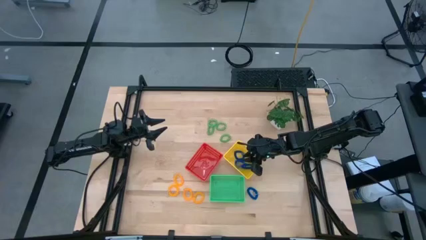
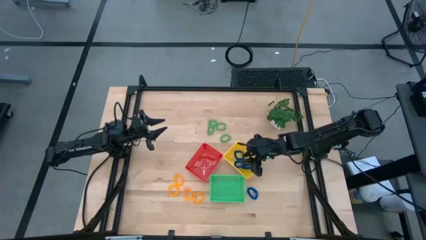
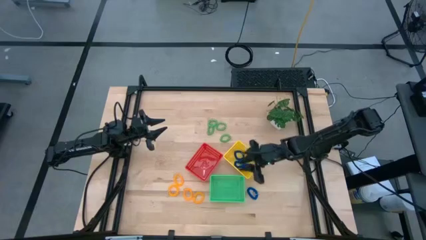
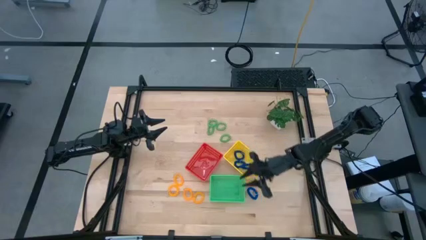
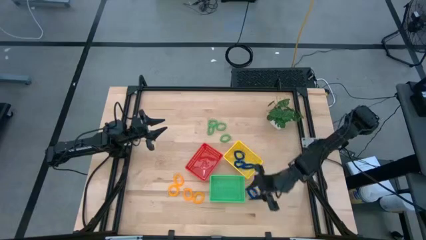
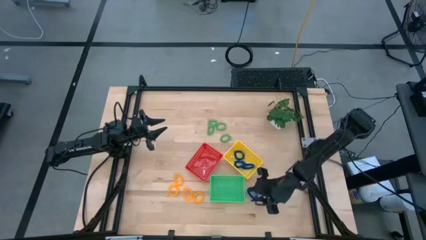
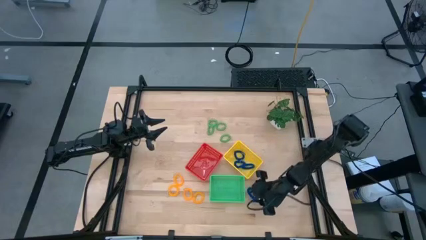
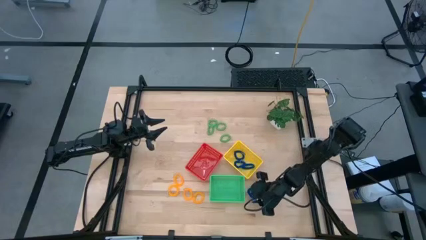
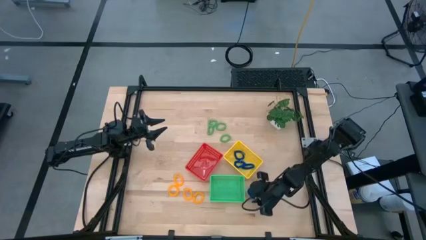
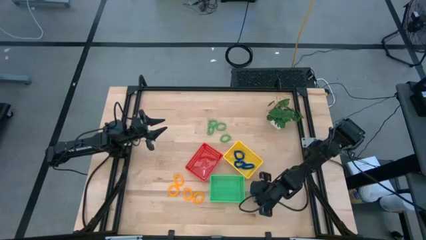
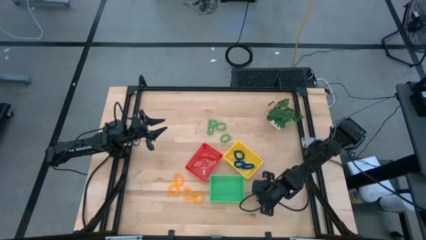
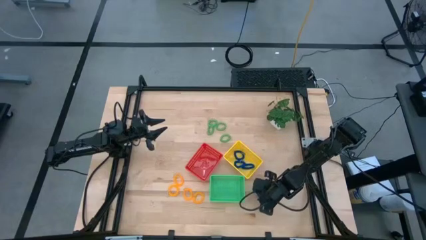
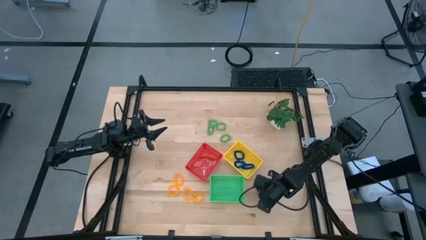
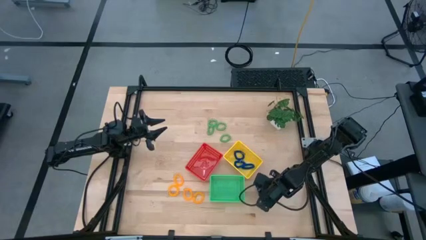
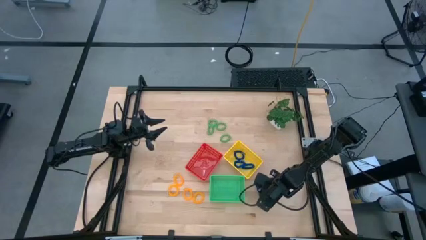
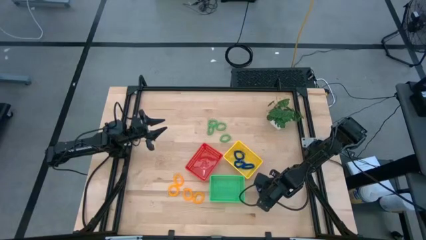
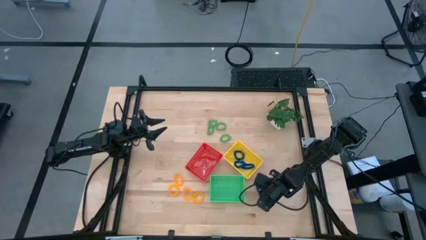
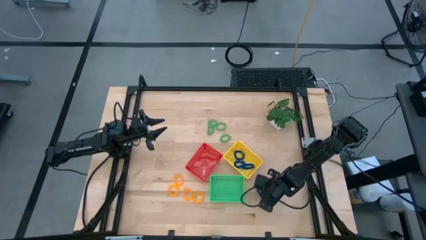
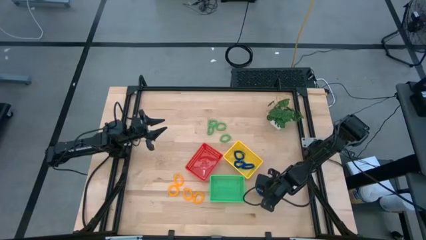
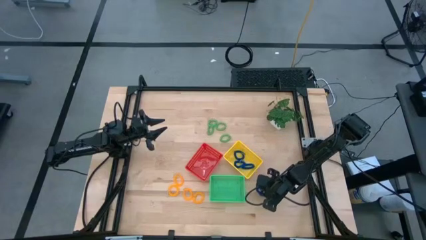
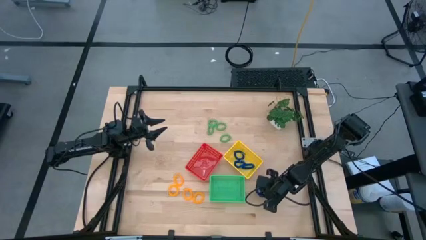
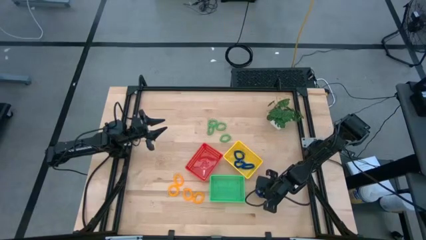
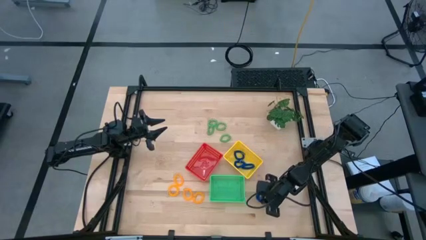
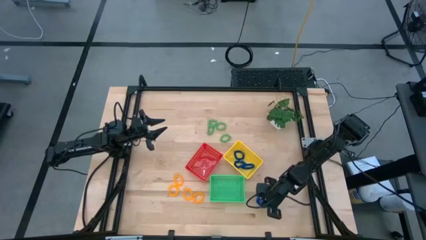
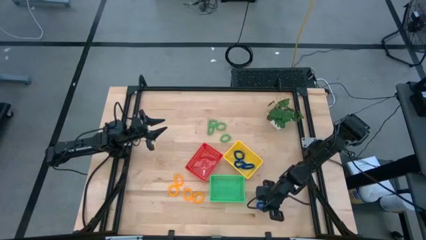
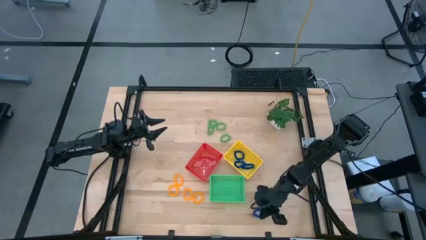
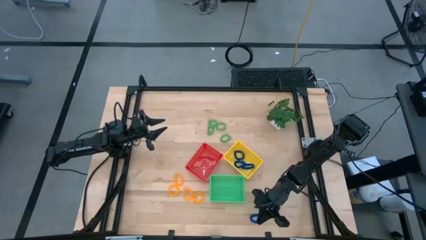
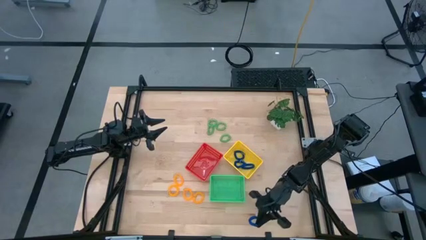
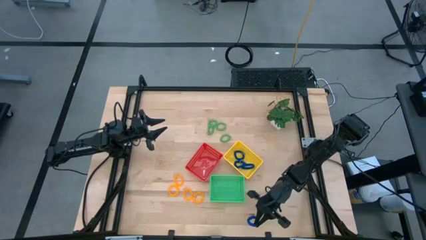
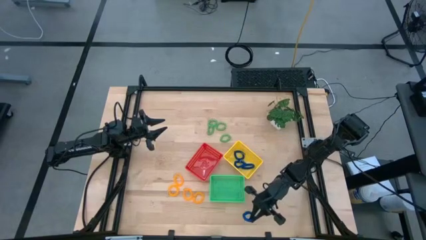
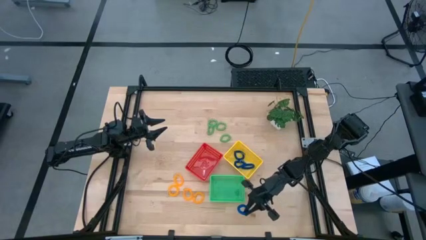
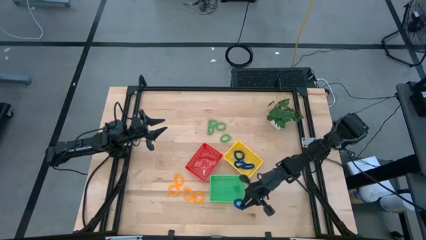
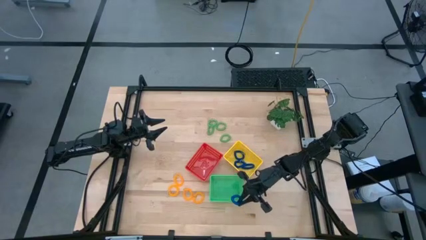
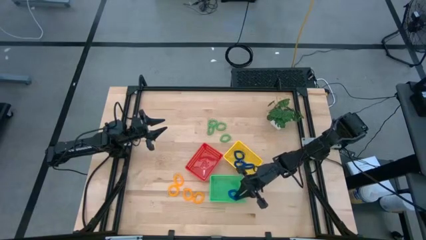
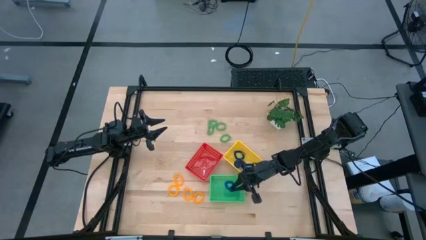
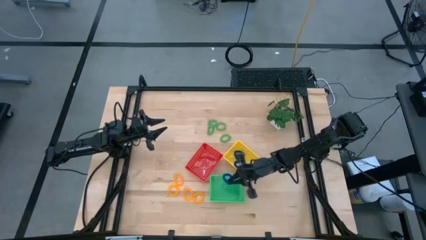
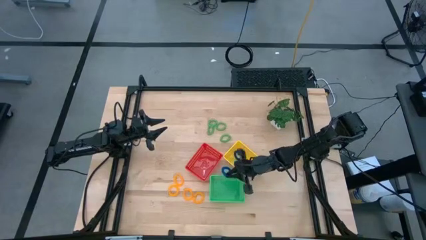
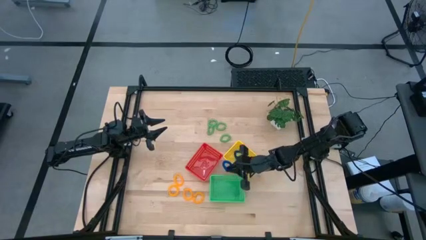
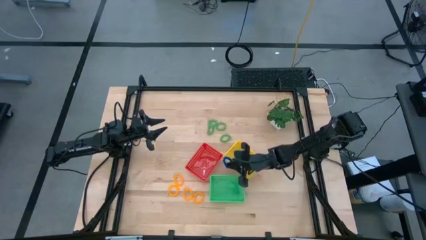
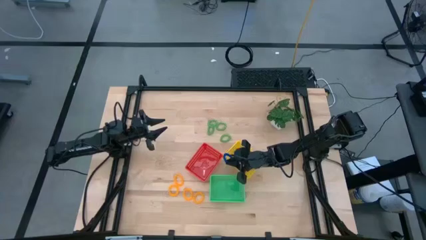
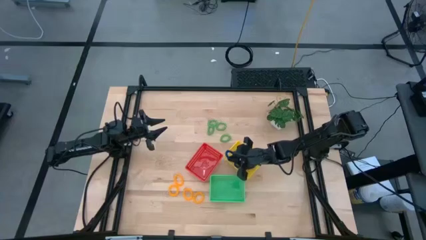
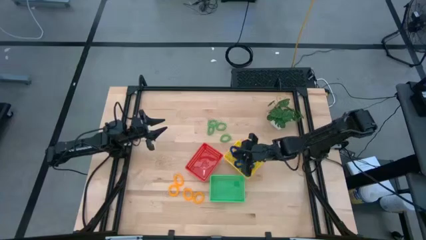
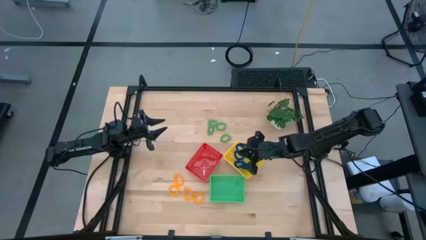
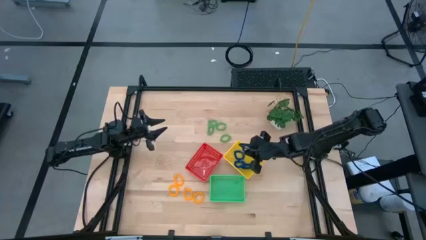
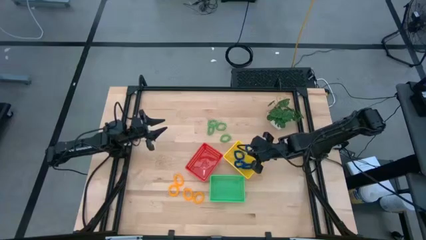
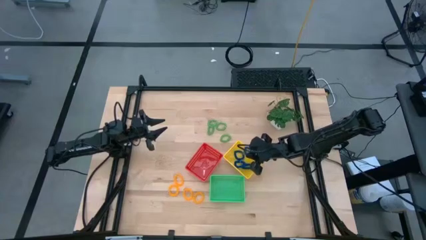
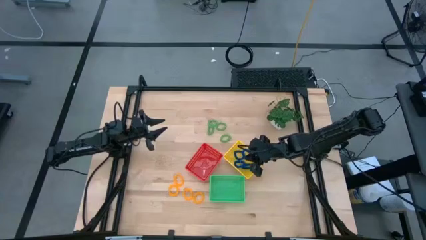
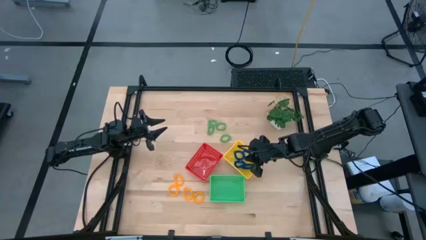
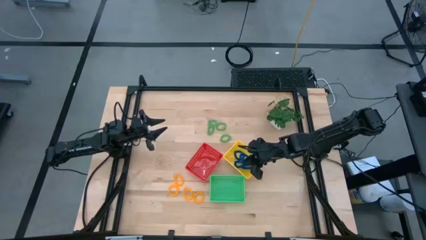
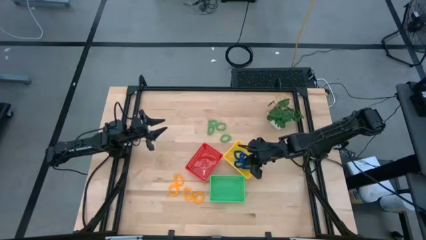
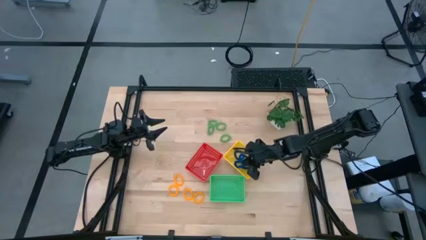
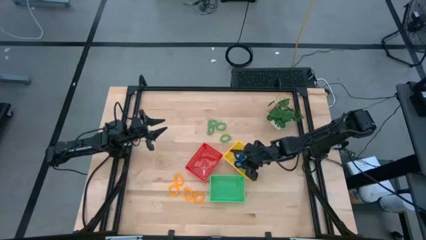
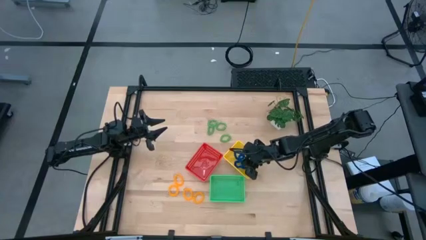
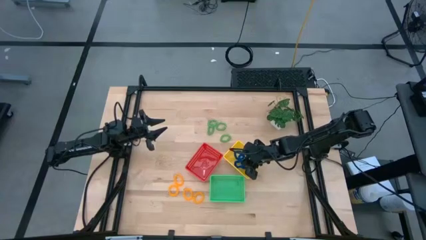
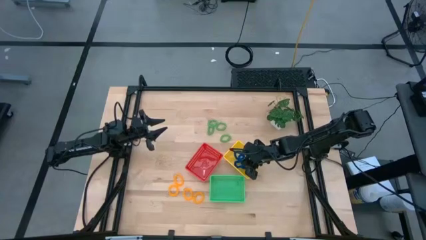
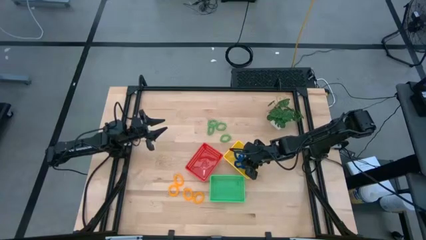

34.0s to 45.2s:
Task: Sort spring keychains
Put the blue spring keychain into the yellow bin

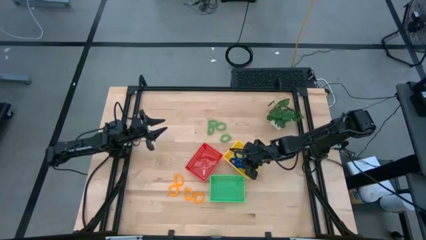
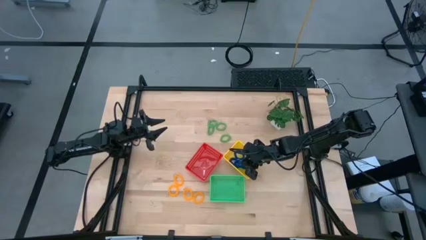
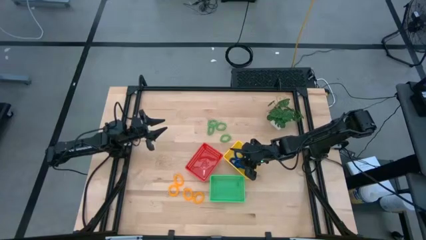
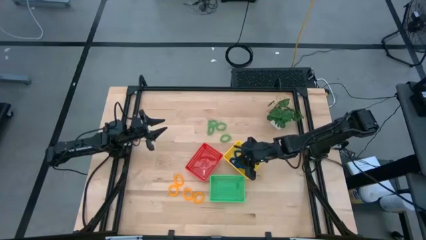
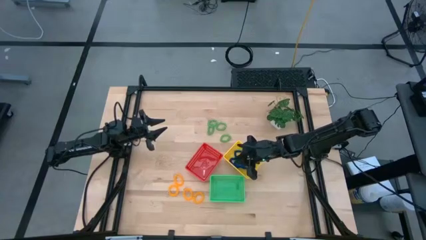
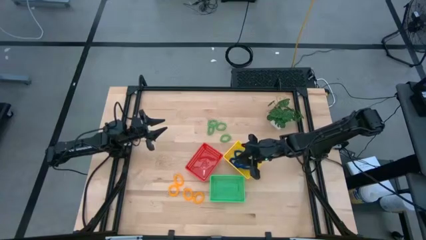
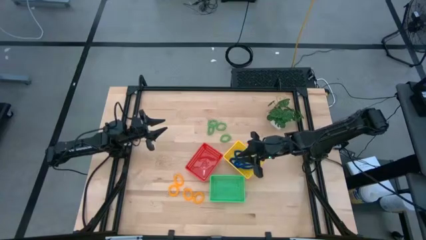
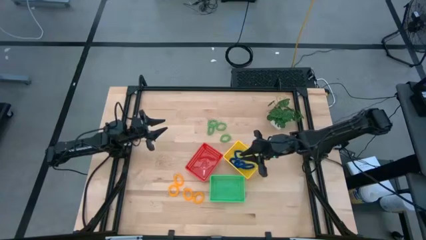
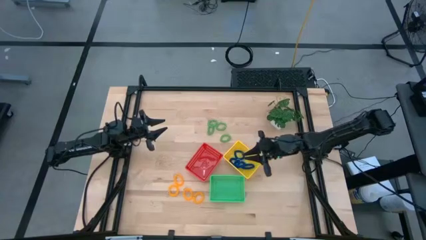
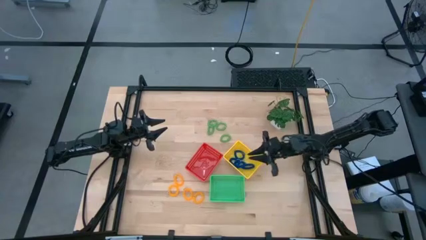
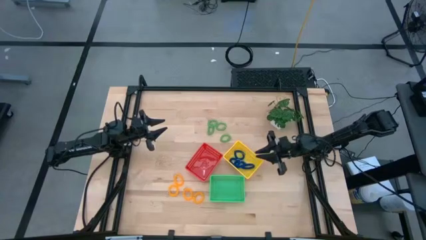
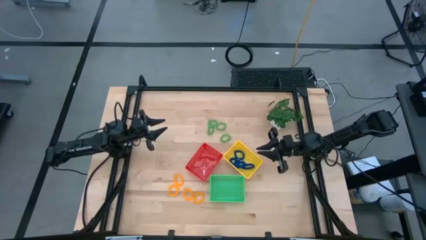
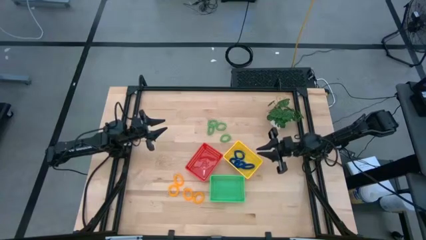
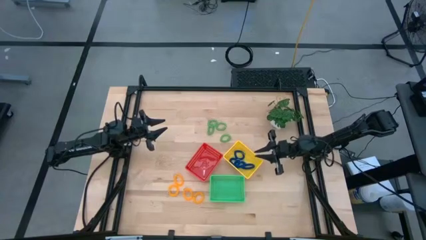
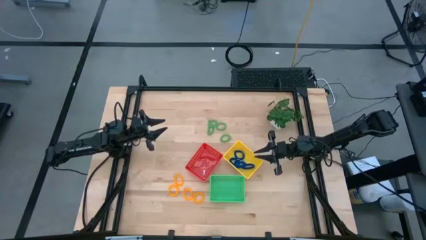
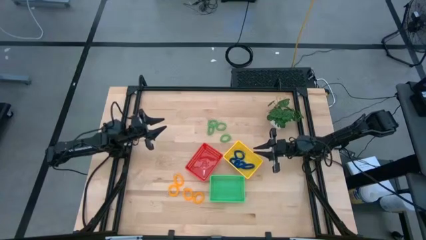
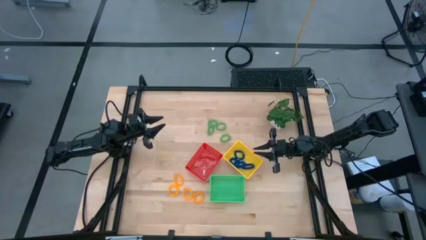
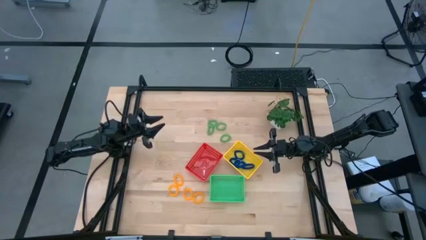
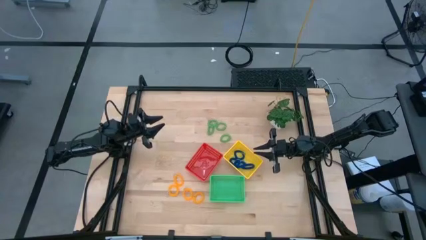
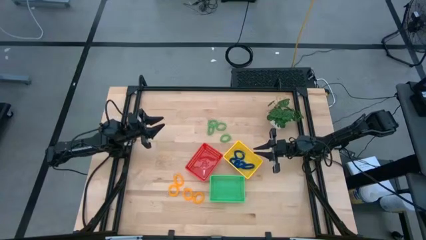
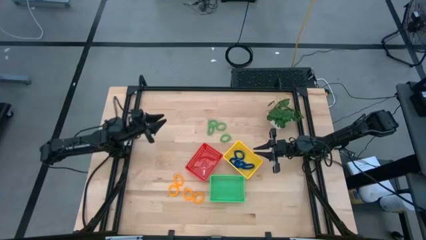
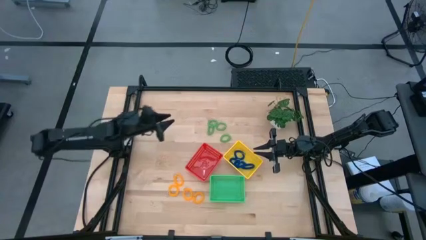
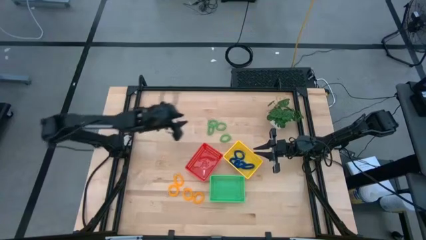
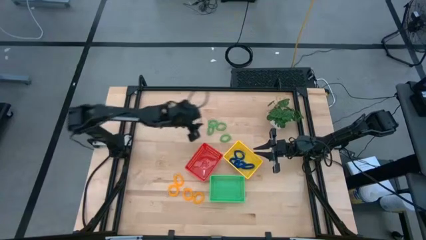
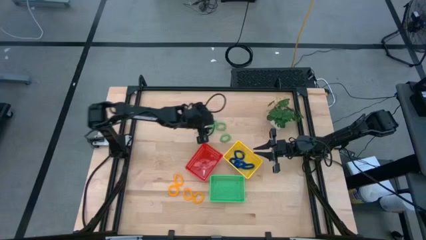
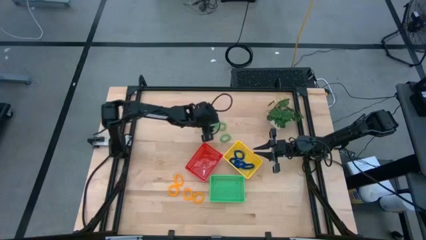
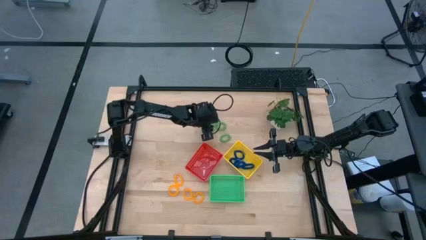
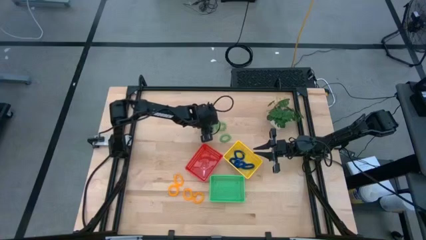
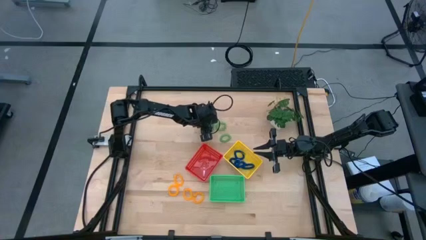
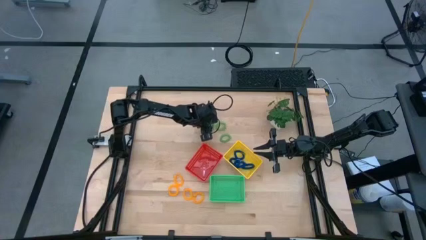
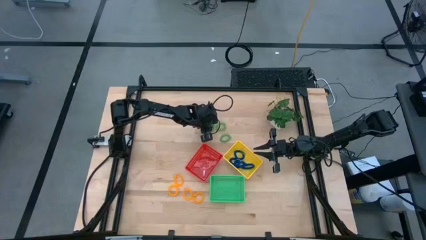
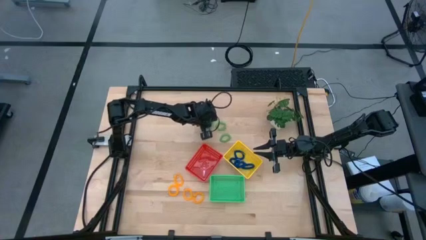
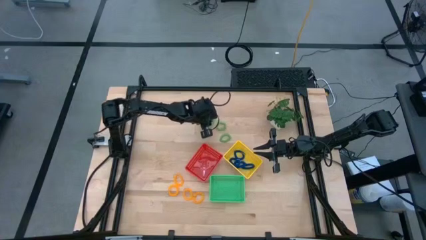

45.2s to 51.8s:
Put the green spring keychain into the red bin
